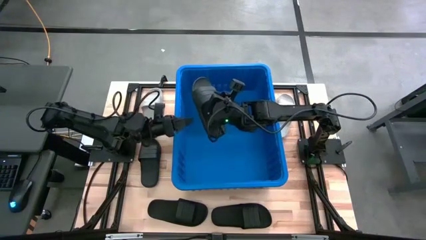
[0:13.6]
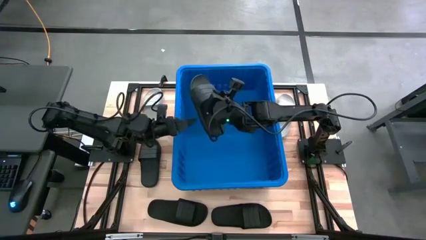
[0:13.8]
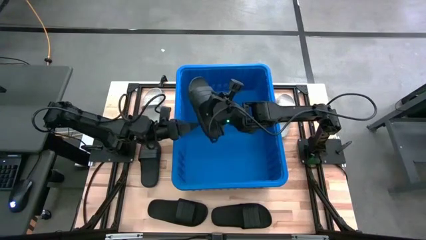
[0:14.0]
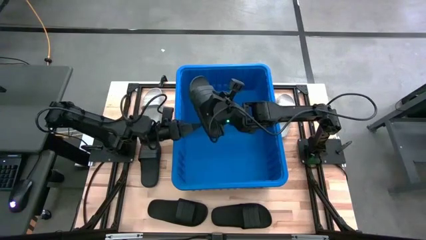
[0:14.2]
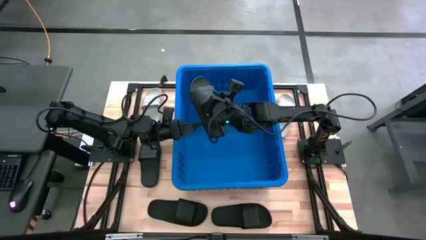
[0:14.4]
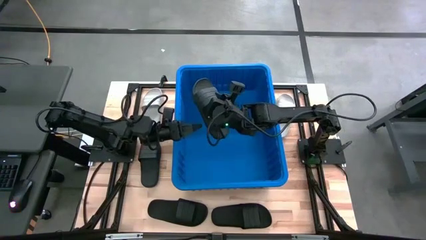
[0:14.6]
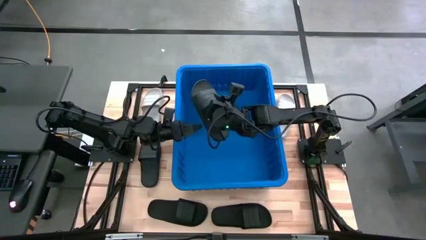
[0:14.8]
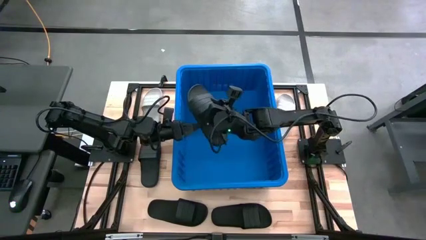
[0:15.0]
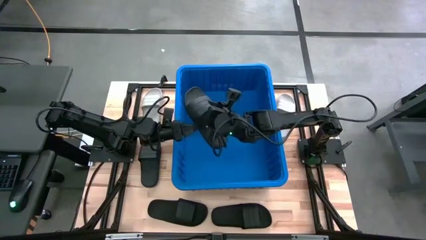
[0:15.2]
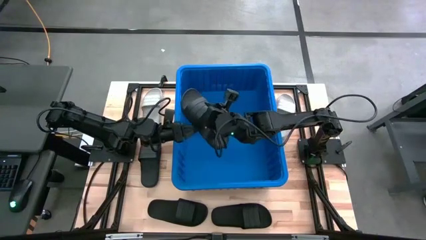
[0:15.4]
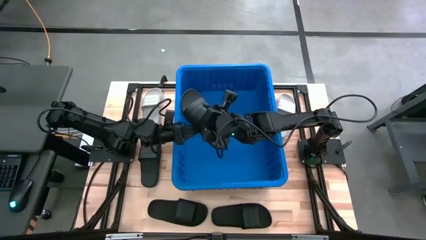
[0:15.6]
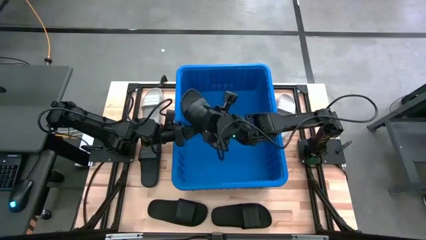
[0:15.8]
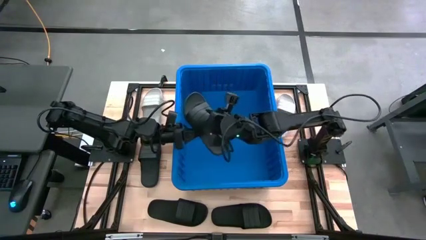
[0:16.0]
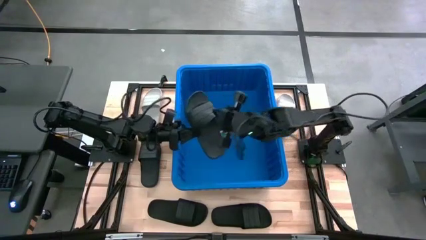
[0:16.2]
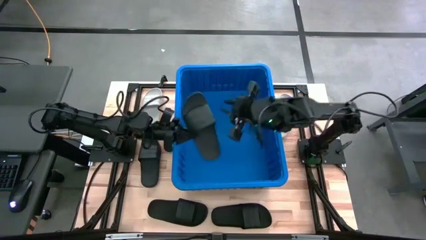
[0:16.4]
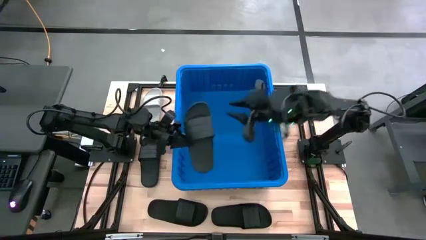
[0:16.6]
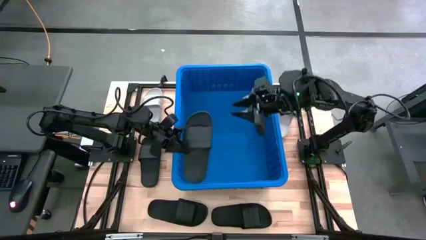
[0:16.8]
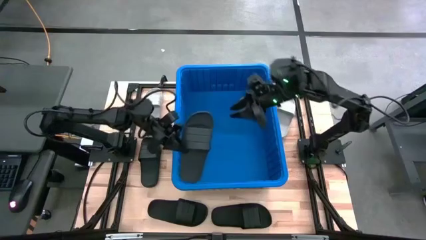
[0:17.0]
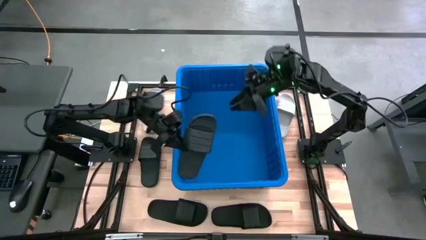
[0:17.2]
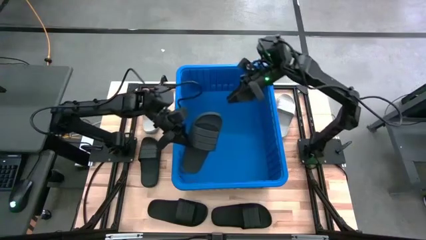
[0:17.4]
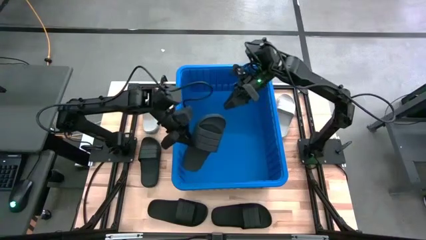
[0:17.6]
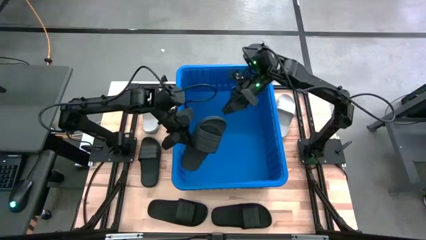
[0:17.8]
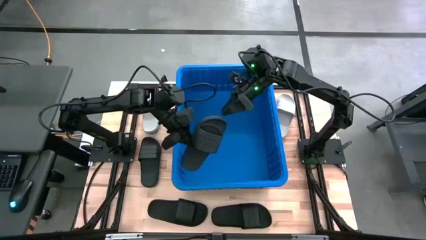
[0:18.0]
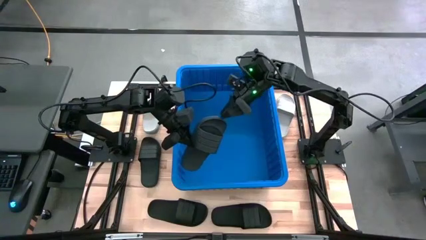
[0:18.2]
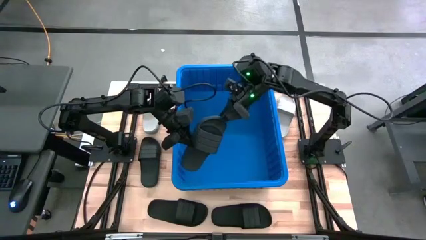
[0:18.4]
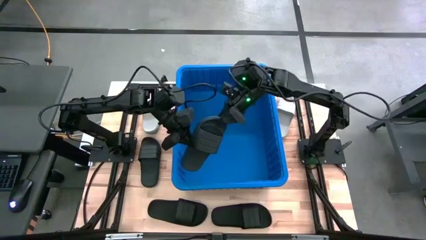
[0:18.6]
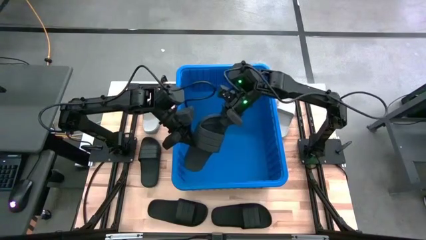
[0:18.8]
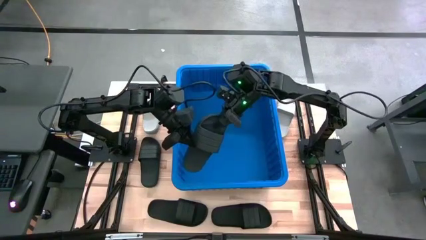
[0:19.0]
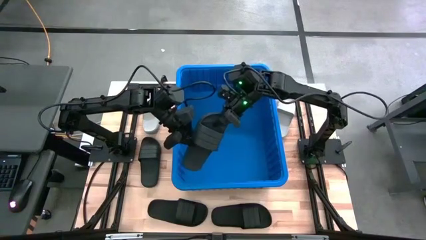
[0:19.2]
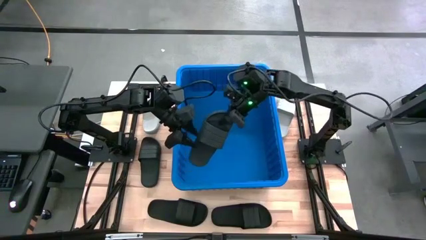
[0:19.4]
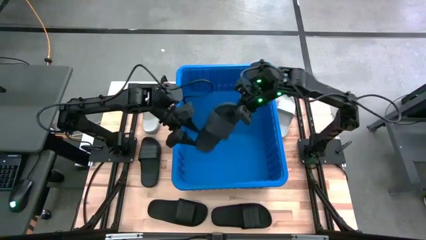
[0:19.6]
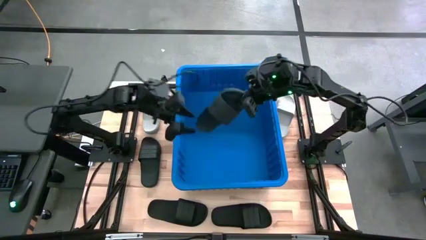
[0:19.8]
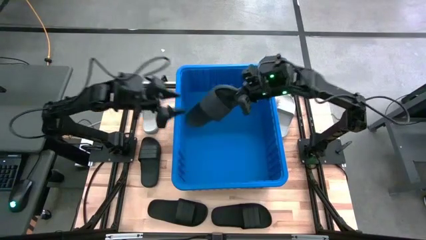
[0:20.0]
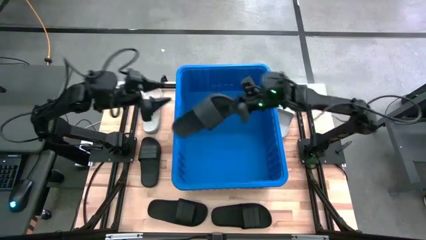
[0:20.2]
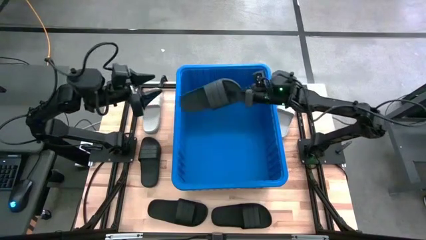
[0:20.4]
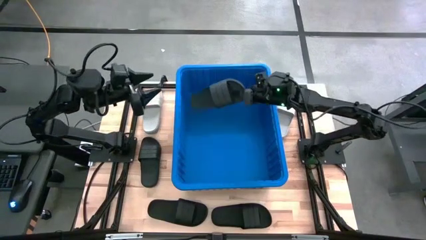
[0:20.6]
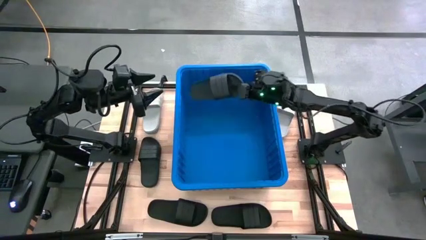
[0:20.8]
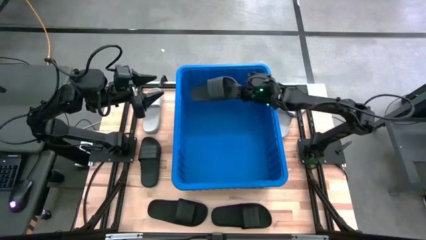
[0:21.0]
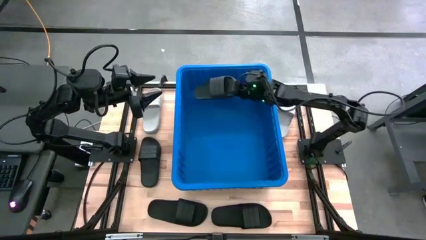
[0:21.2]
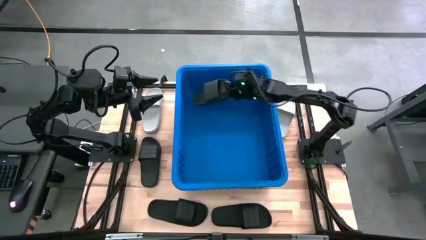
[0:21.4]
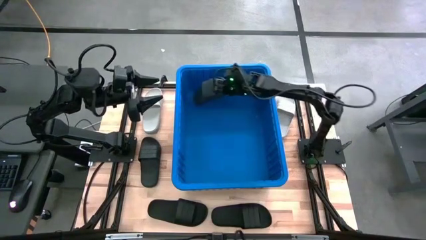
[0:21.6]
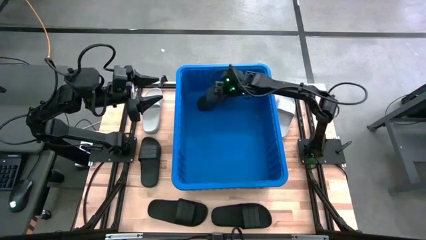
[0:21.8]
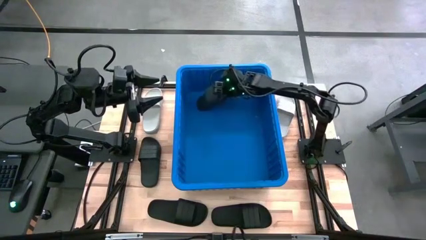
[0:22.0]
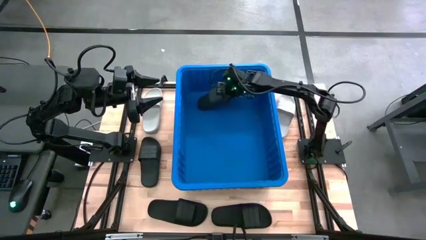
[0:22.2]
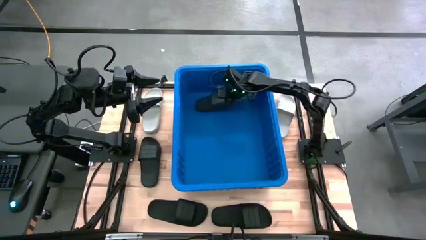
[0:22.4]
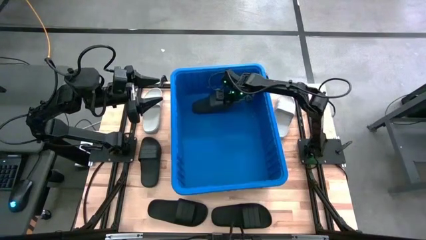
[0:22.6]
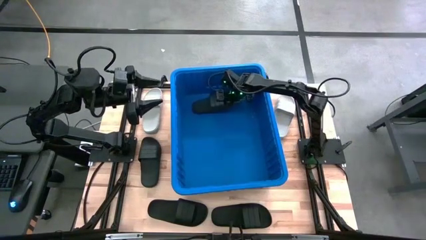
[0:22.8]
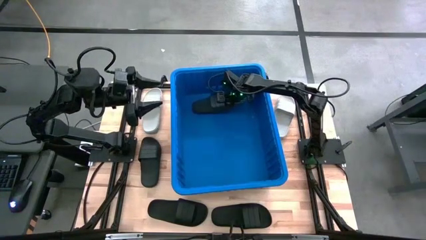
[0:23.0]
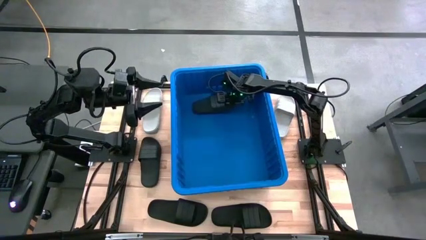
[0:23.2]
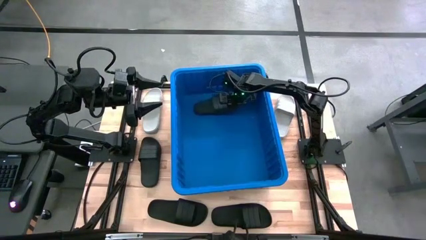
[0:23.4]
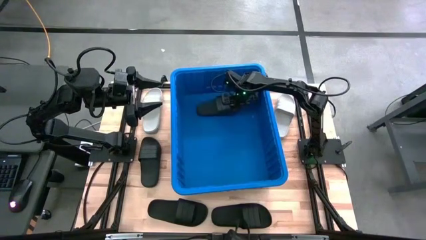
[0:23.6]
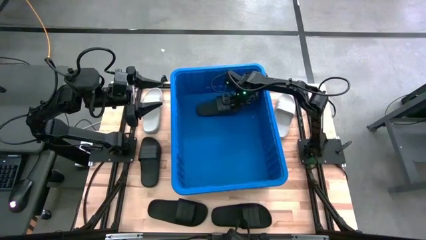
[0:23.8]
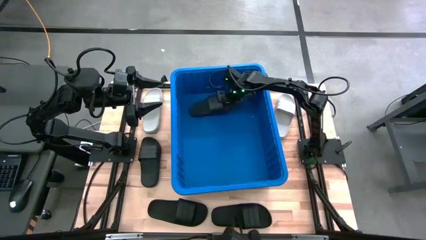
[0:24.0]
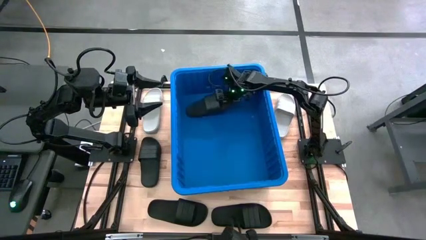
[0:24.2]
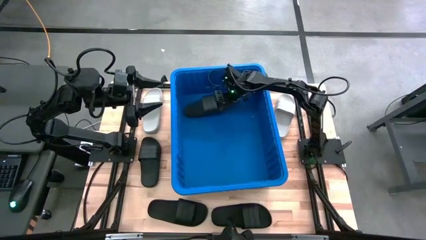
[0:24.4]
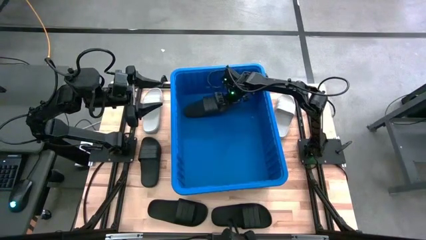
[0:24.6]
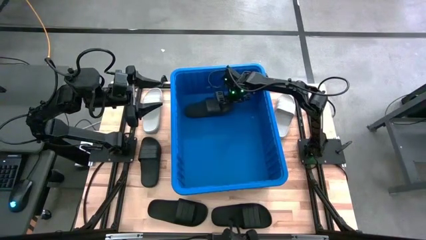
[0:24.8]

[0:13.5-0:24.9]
Task: Pick and place slides into bin
Put the black slipper into the bin

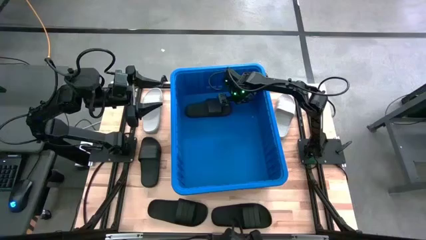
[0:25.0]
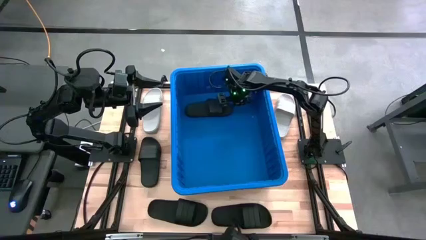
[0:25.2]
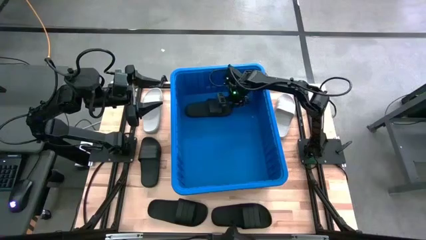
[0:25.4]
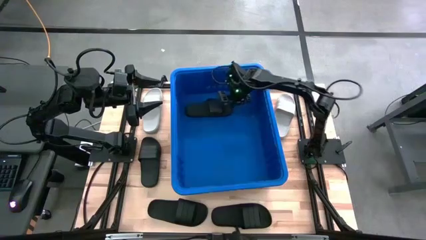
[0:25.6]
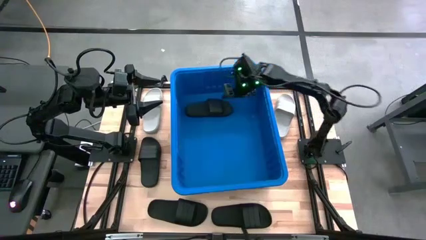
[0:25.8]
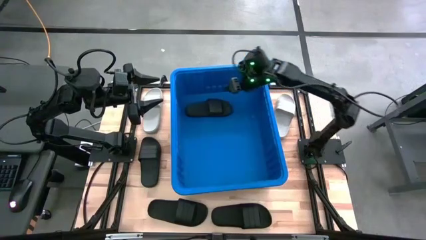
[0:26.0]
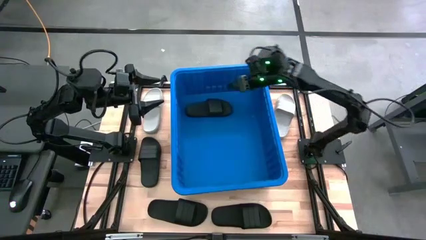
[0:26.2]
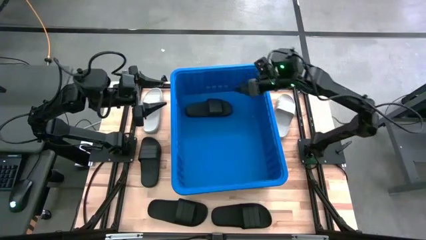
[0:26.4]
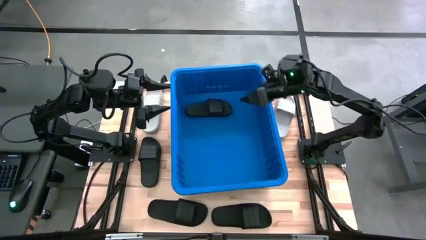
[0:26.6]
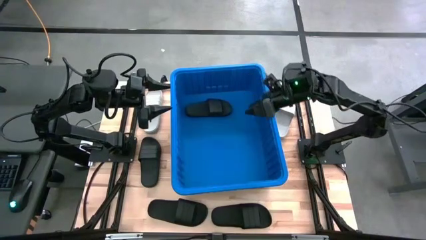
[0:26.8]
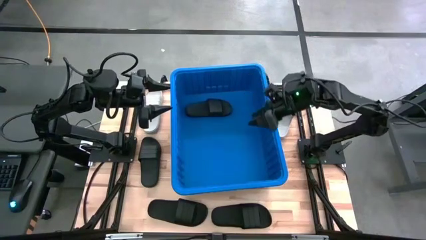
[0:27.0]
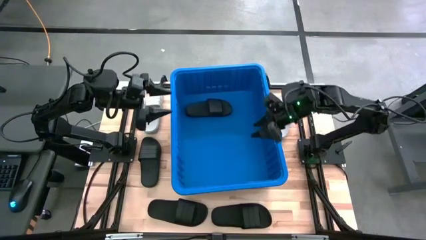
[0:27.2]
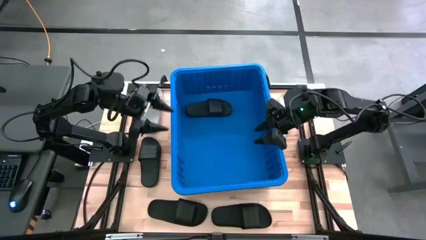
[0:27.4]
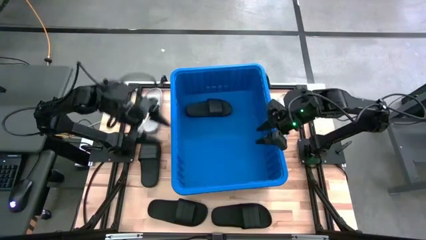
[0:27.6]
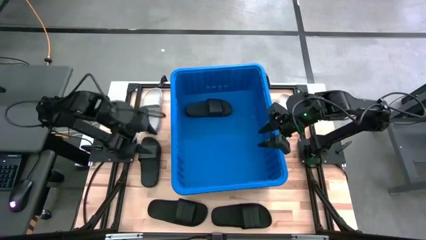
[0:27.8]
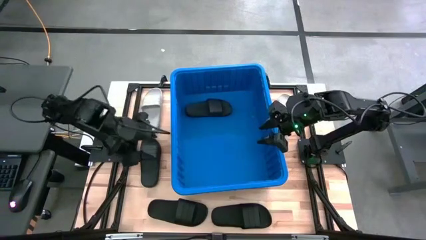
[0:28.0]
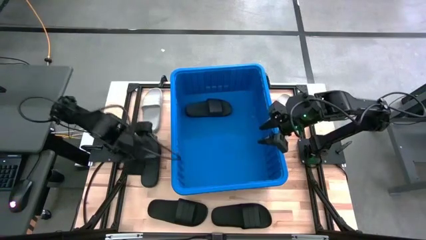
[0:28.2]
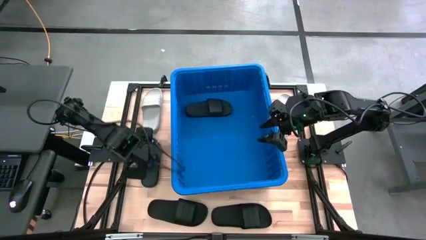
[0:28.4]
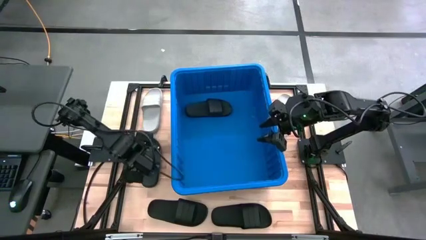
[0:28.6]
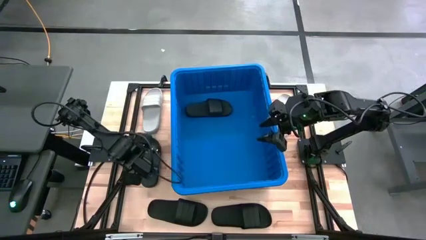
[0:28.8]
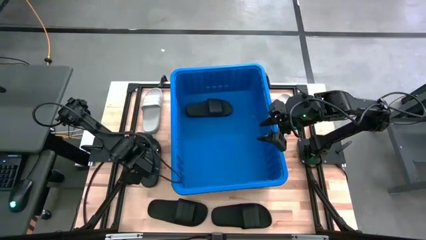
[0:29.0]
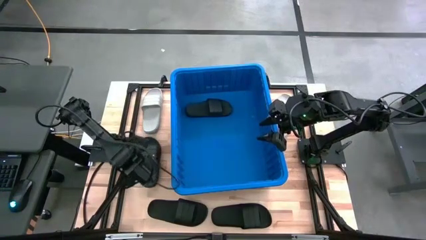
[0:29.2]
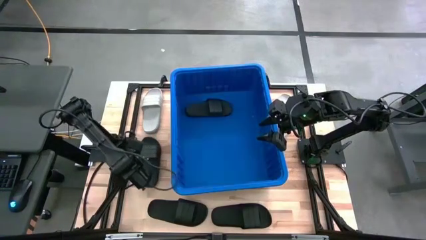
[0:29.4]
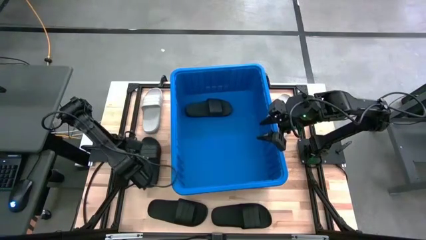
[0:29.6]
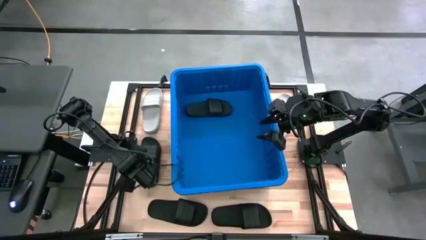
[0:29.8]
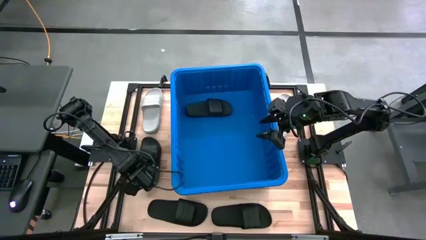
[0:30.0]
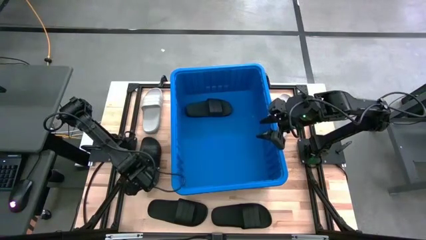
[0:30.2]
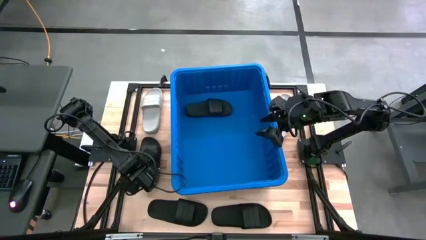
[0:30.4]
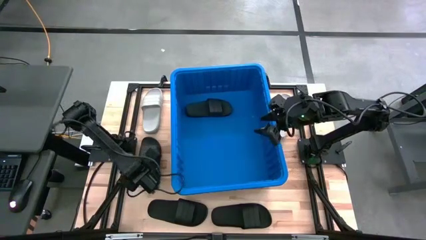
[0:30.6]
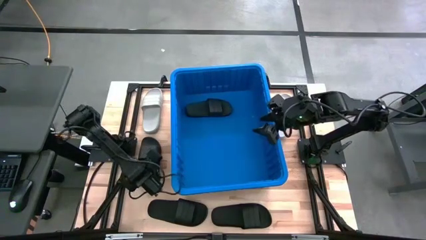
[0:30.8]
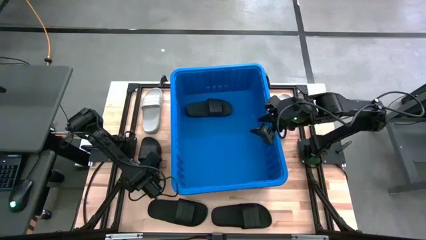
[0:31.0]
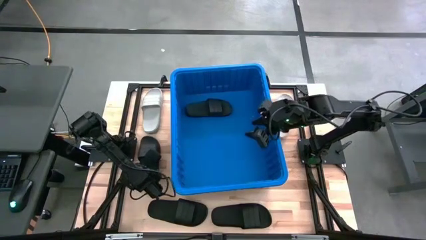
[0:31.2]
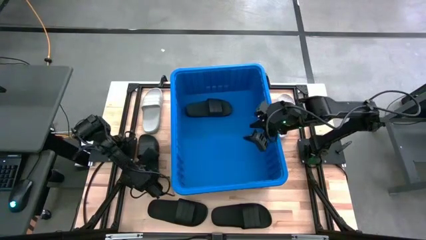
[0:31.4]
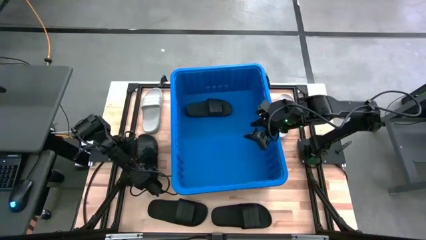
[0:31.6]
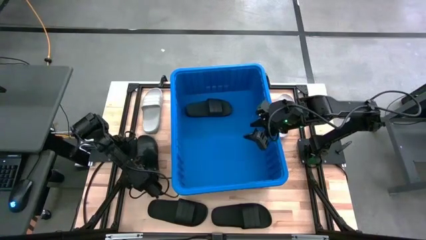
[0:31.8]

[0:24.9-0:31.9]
Put the black slipper into the bin
